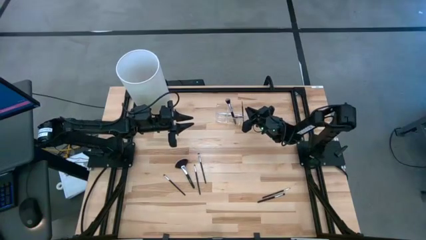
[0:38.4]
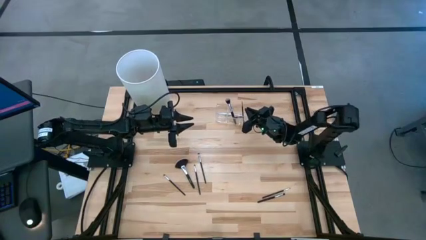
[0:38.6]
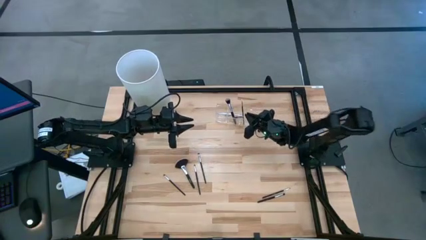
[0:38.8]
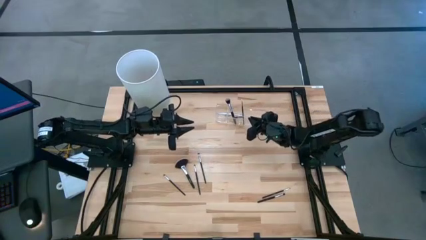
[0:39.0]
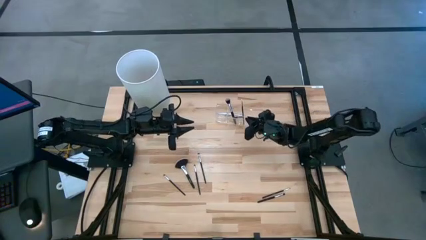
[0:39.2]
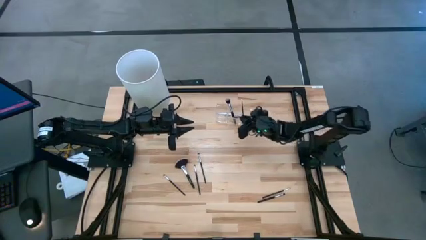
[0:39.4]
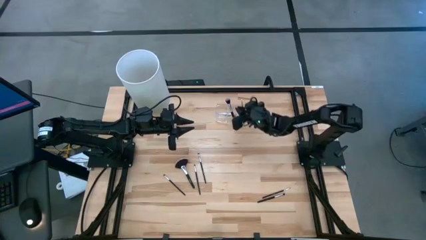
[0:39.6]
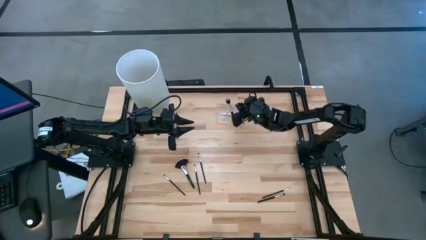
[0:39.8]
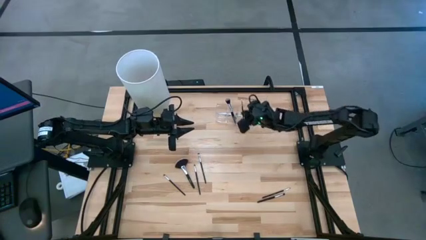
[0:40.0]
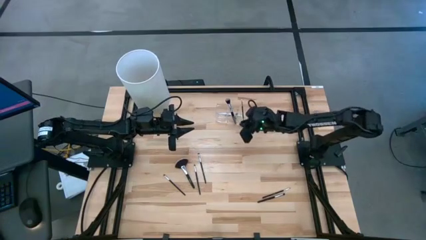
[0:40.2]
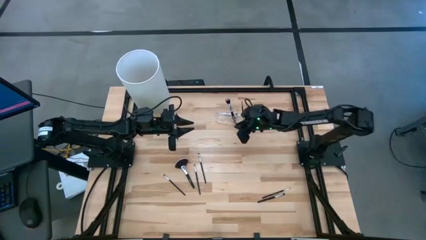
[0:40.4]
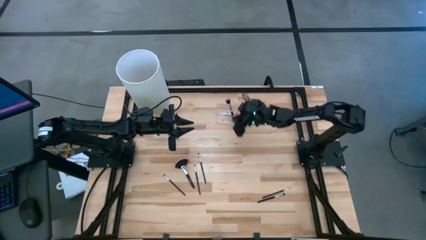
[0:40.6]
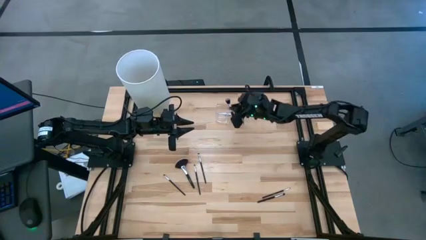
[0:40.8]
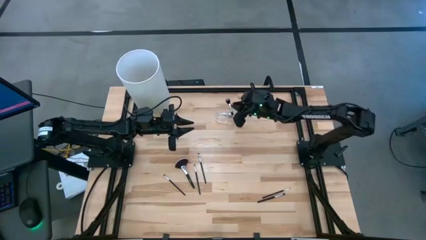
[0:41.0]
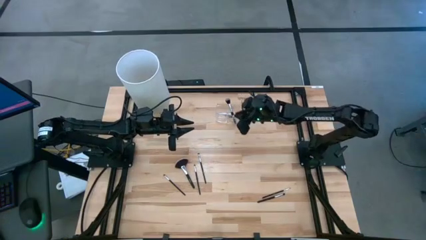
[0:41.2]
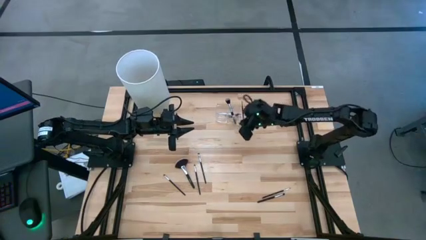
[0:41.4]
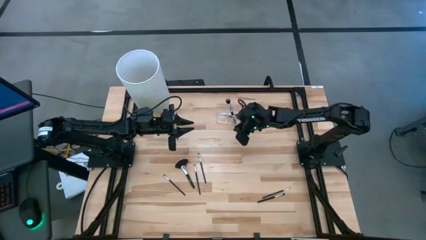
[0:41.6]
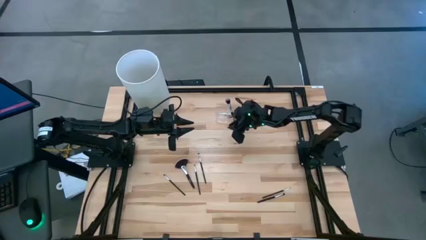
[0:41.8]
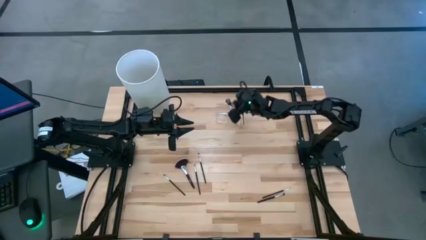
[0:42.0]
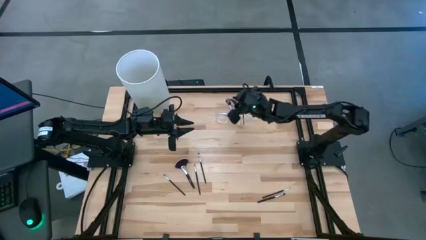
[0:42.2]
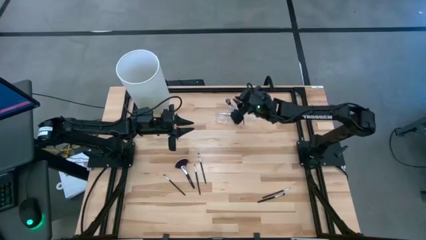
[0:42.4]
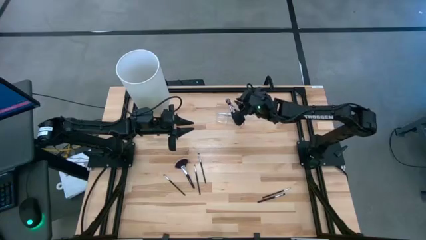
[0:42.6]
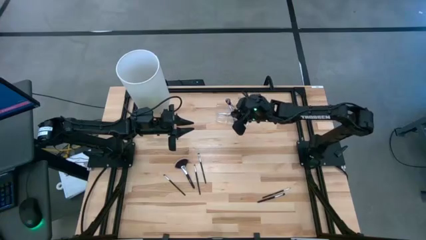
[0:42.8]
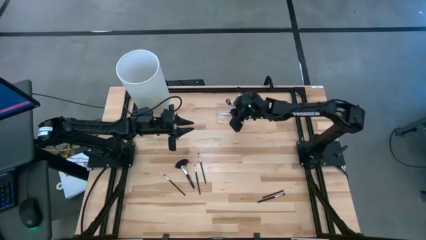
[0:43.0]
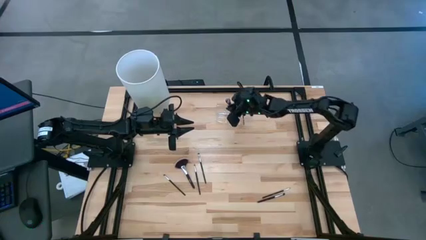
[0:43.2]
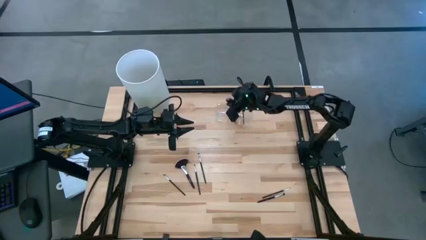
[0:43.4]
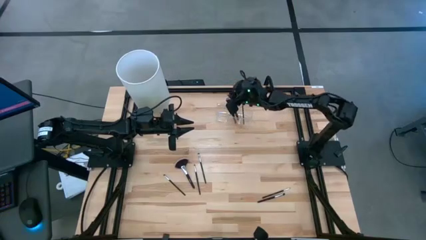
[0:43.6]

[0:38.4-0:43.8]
Task: Put items in baskets/containers
Adjust the black blush brush in the transparent organizer

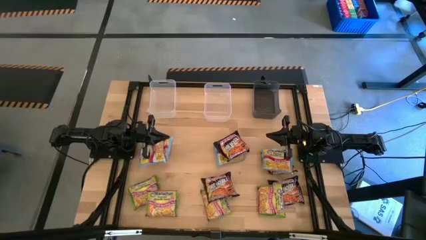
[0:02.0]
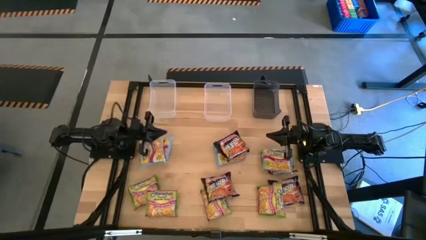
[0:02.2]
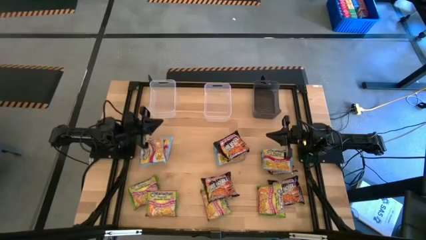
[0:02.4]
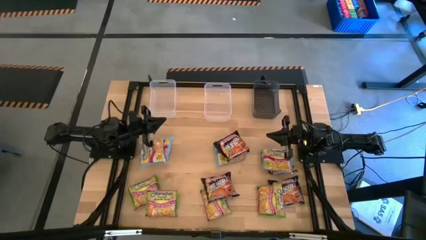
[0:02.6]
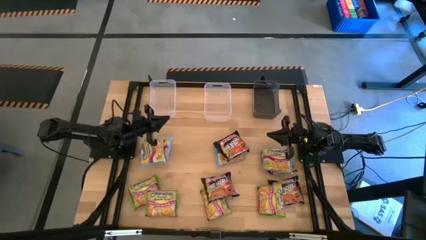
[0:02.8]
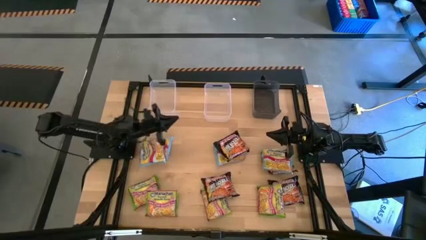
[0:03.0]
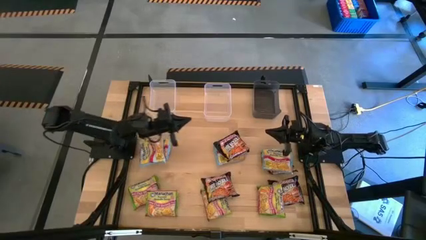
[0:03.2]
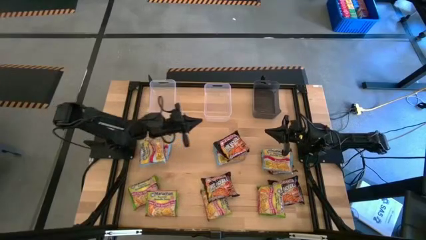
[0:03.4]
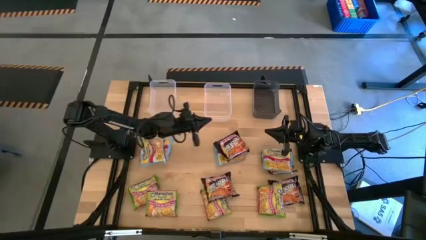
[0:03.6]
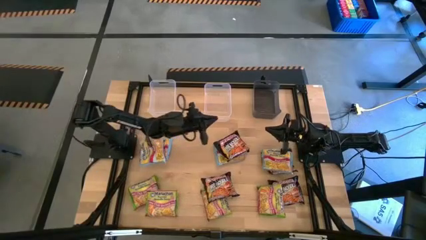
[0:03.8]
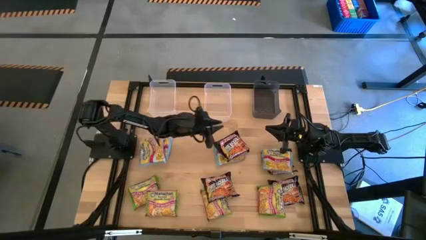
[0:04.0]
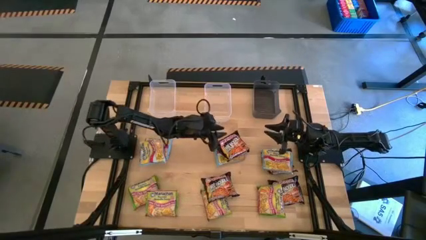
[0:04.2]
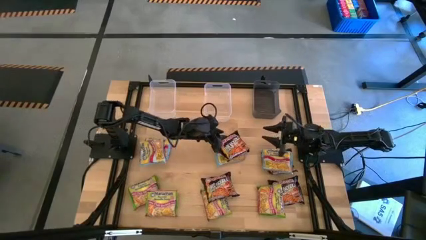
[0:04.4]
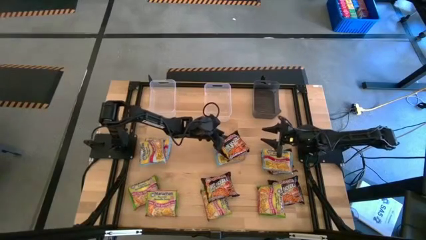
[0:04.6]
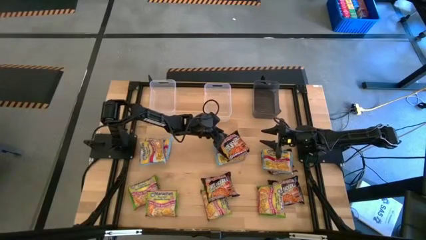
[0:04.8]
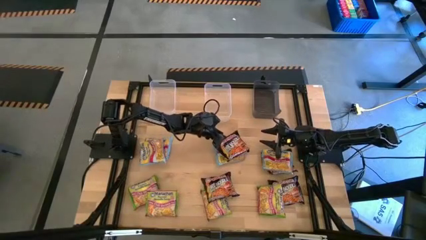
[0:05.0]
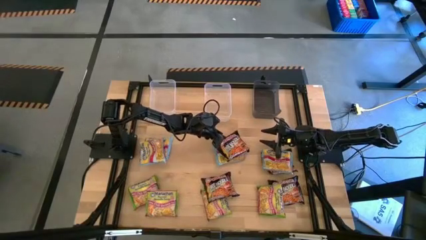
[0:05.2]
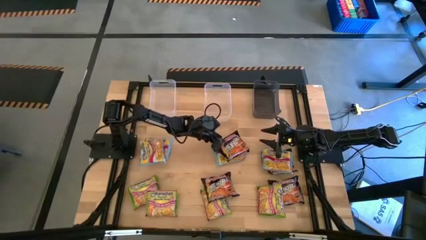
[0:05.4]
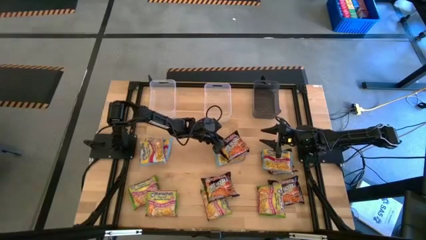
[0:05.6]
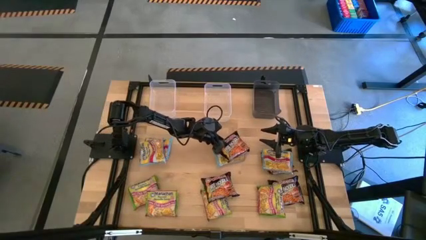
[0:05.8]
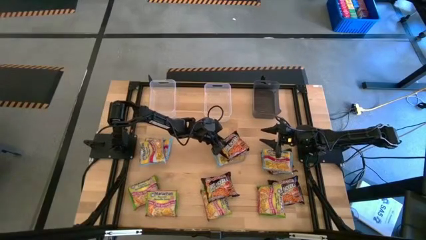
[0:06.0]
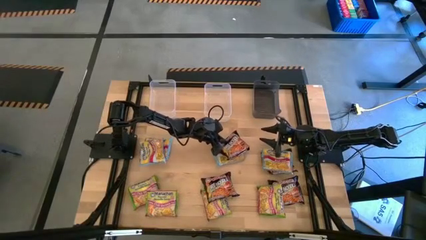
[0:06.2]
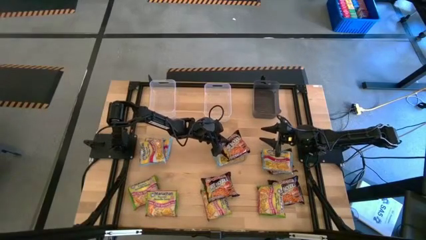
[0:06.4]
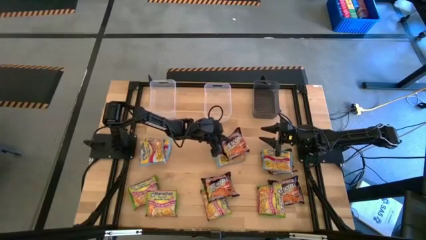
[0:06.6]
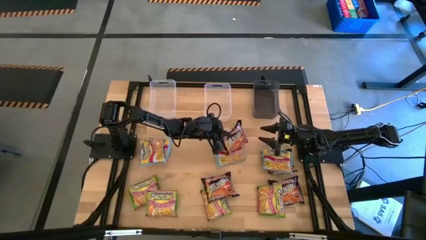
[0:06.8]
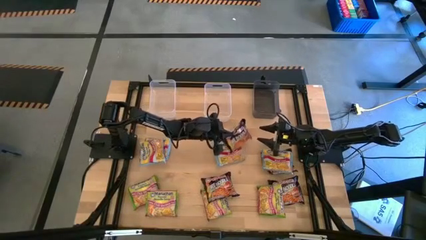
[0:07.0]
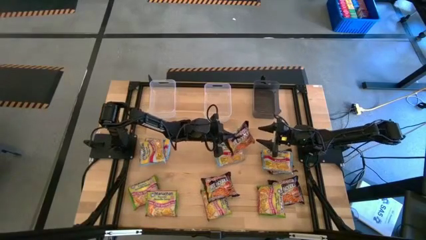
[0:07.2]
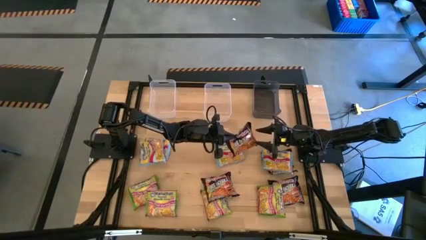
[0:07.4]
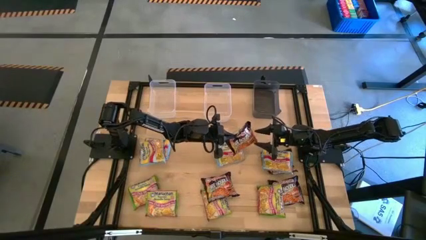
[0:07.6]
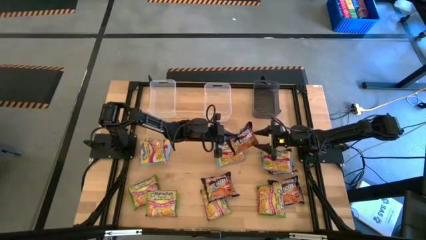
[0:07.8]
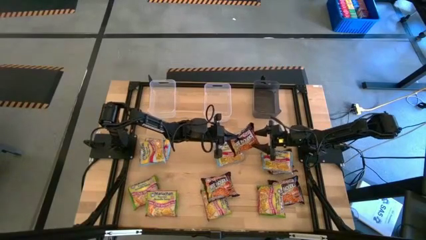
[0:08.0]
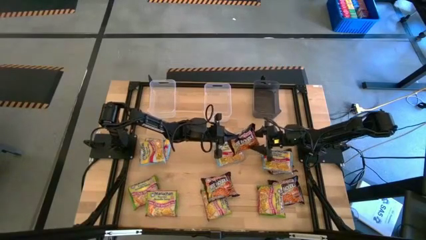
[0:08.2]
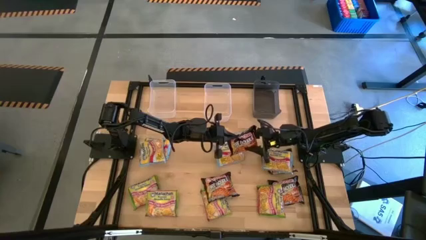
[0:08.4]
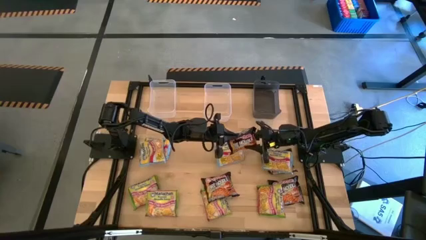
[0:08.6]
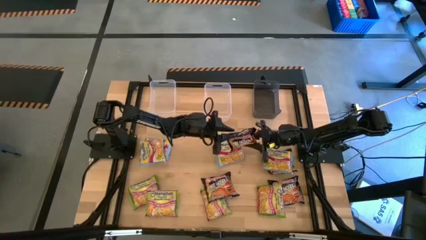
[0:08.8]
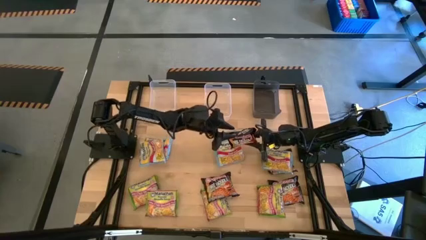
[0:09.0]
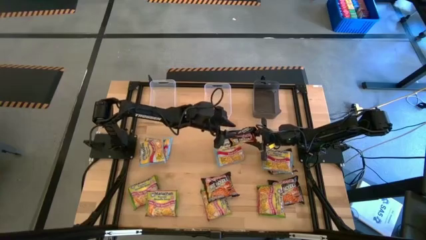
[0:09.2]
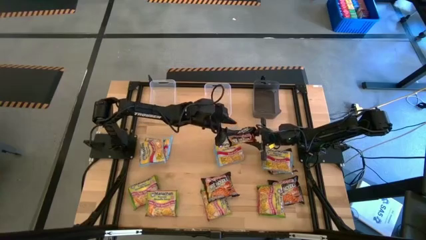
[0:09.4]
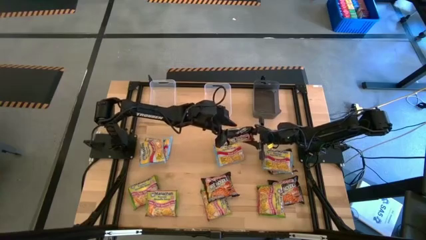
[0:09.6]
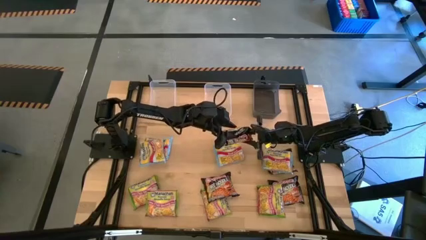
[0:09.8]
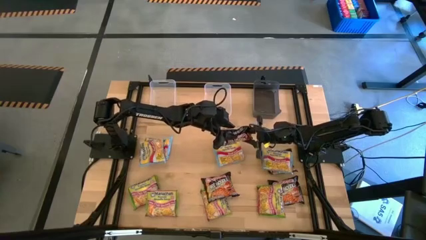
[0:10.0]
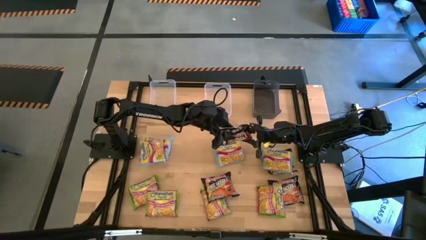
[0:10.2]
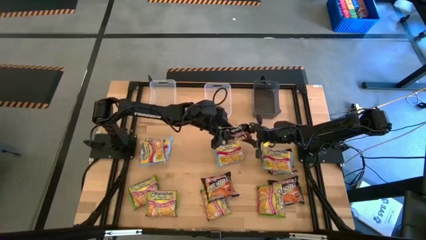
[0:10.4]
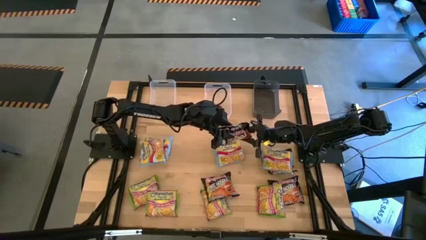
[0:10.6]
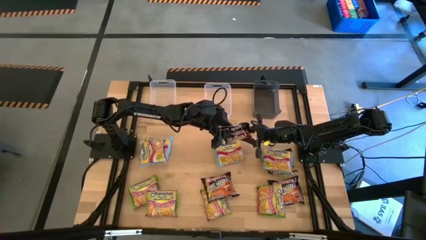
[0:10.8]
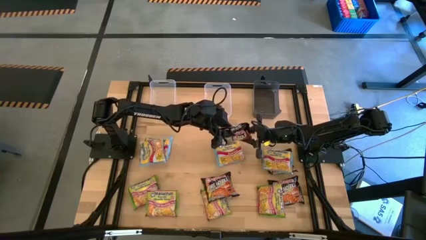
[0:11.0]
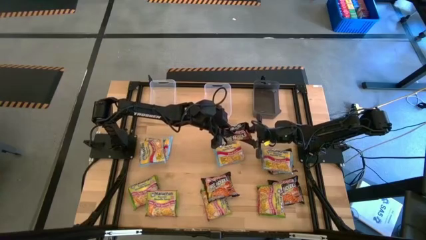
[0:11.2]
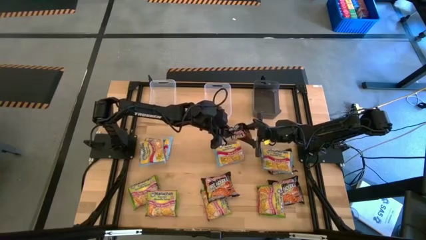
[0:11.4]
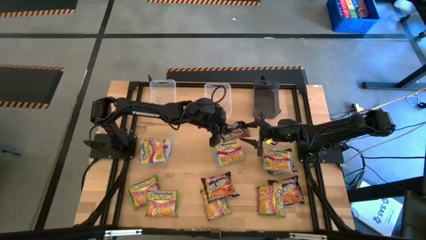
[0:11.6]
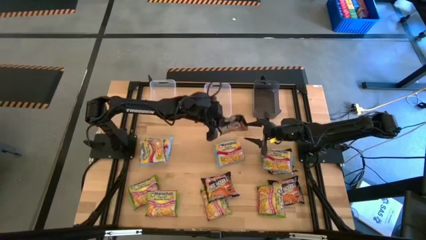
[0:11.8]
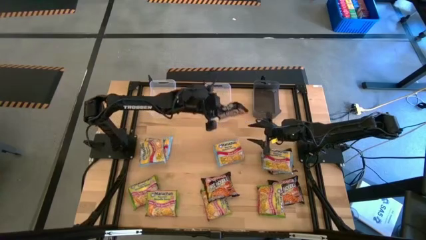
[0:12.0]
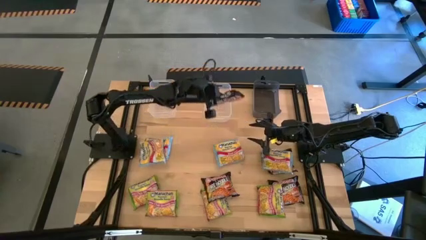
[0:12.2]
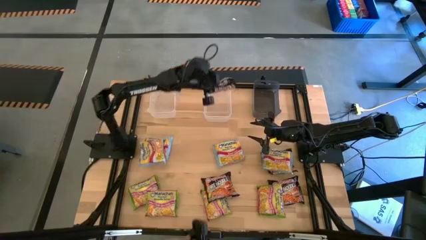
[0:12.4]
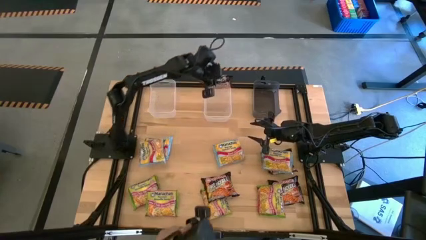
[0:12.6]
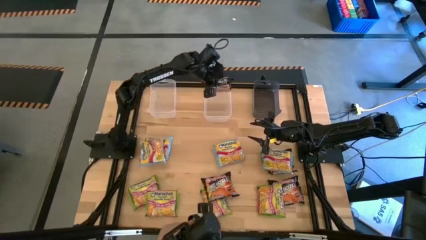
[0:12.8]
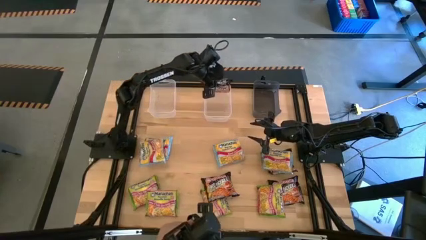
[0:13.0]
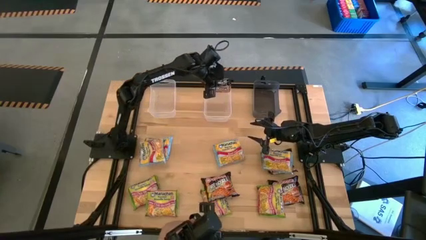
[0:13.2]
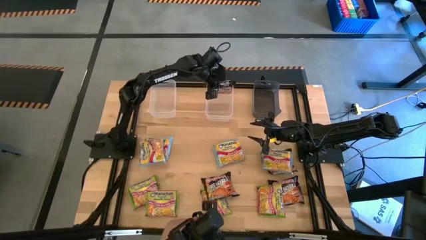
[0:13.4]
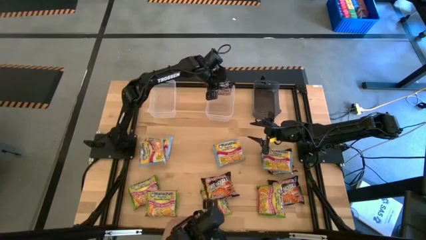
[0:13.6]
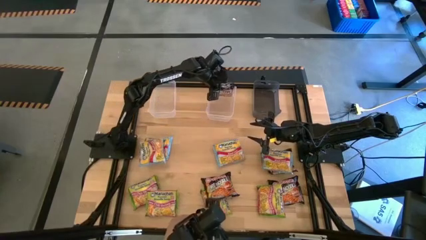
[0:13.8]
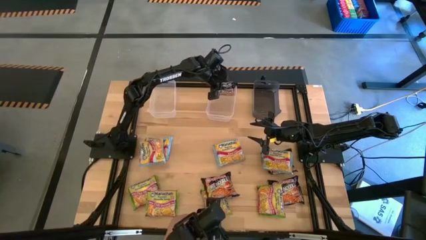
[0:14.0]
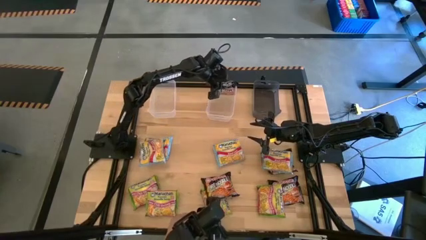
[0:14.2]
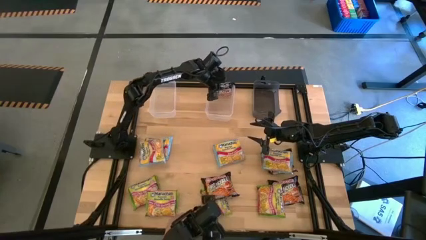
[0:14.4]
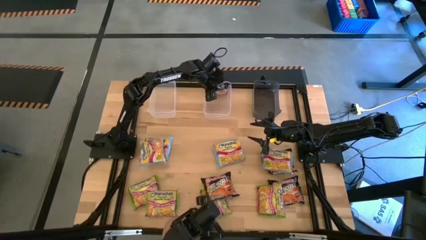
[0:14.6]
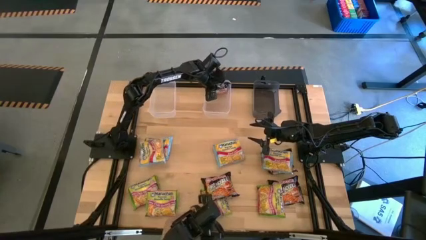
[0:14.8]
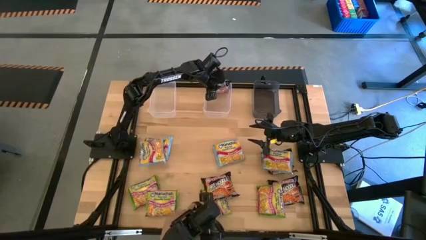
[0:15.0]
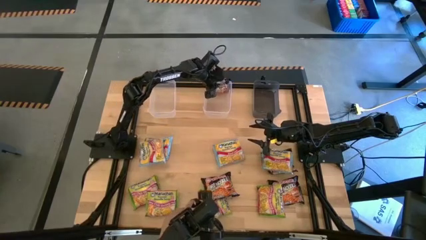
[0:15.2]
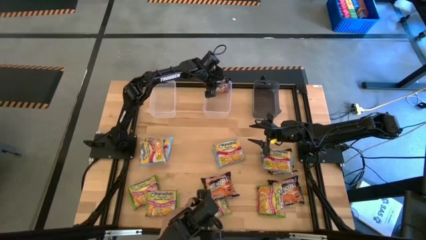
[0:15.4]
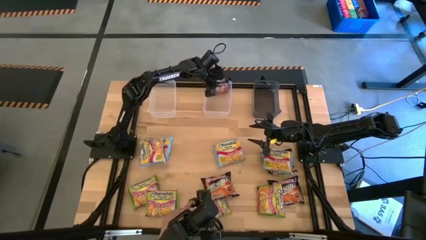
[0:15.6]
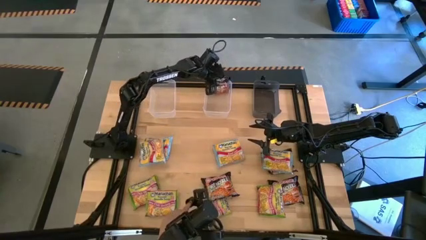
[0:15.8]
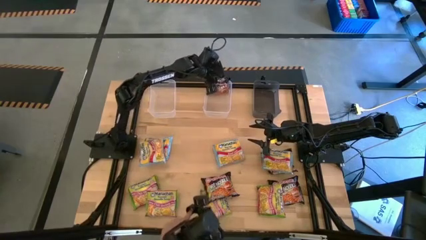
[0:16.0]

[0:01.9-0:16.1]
Task: Sort Maruchan noodles
Put the black noodle pack into the right transparent bin
